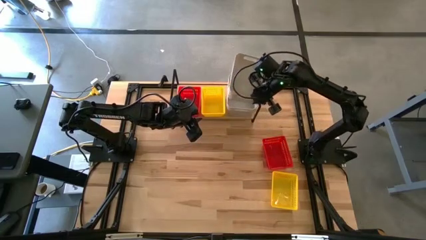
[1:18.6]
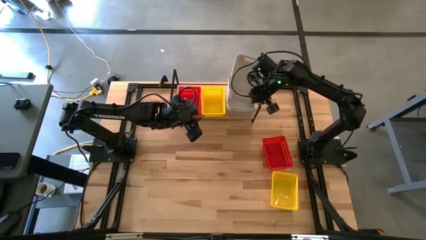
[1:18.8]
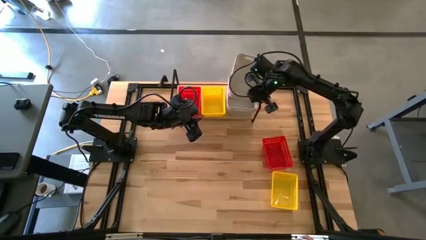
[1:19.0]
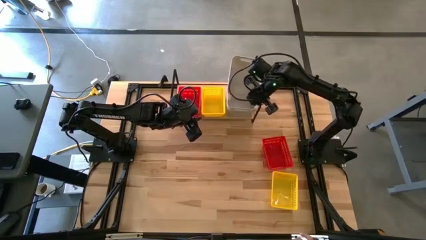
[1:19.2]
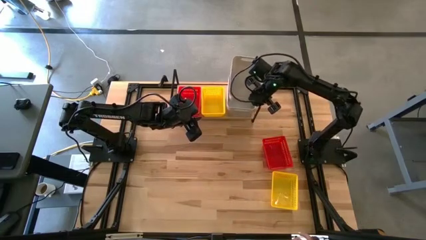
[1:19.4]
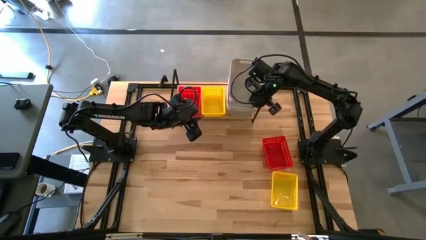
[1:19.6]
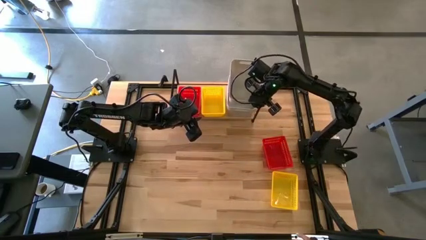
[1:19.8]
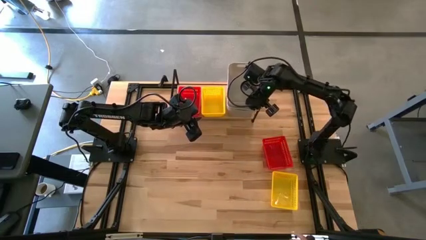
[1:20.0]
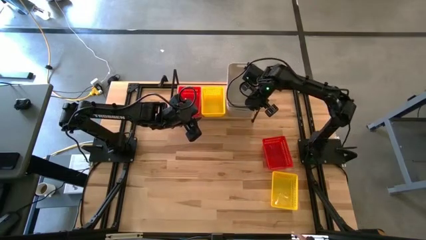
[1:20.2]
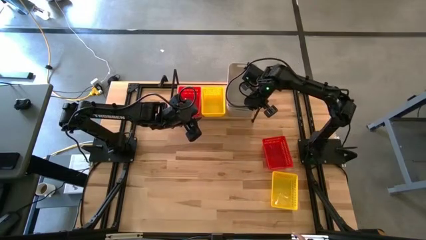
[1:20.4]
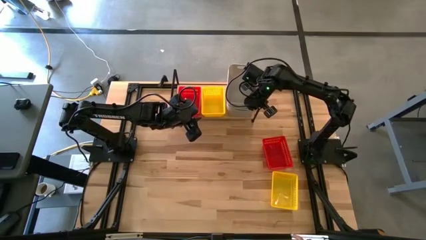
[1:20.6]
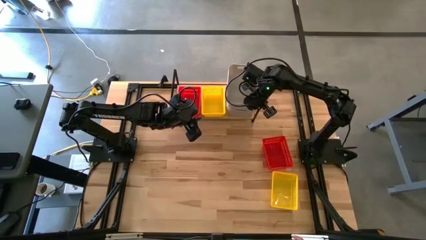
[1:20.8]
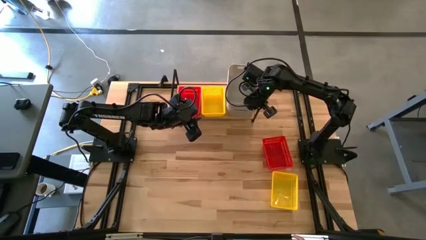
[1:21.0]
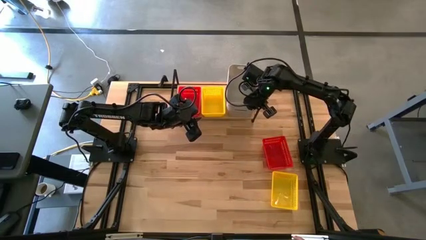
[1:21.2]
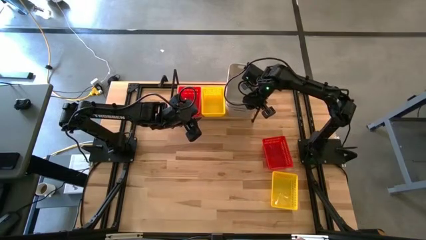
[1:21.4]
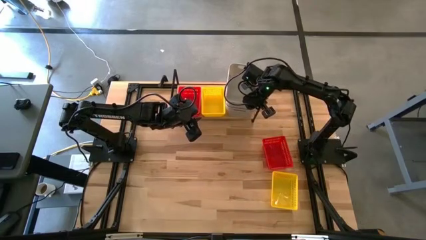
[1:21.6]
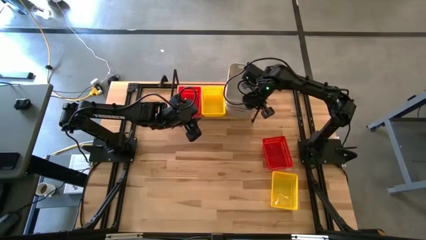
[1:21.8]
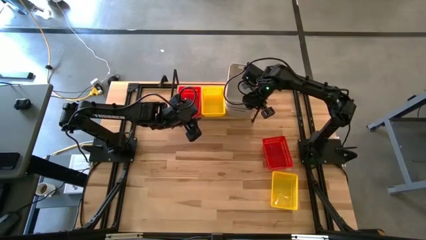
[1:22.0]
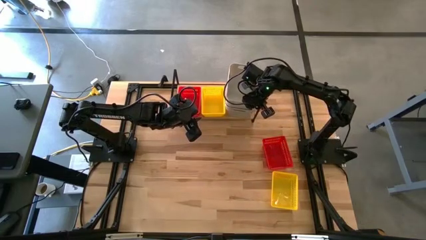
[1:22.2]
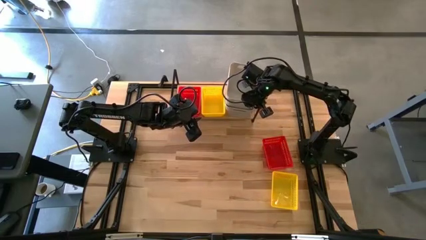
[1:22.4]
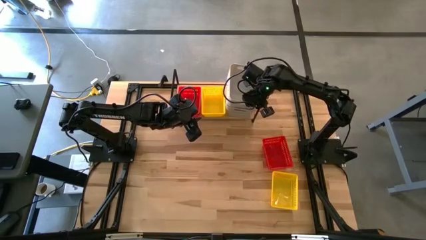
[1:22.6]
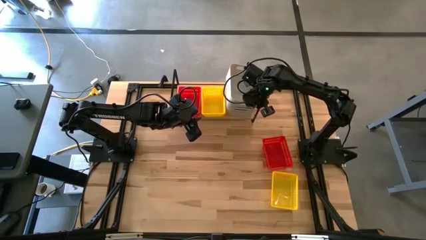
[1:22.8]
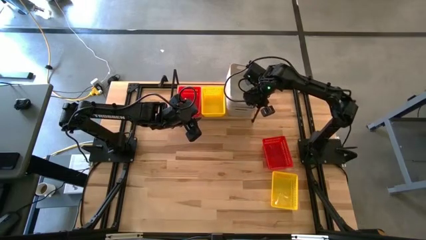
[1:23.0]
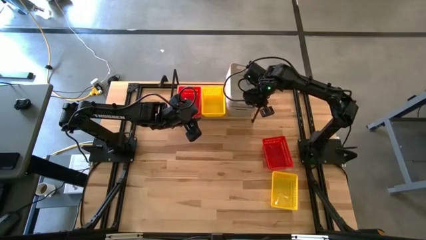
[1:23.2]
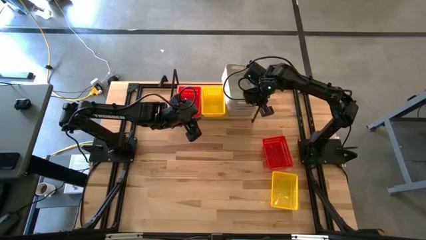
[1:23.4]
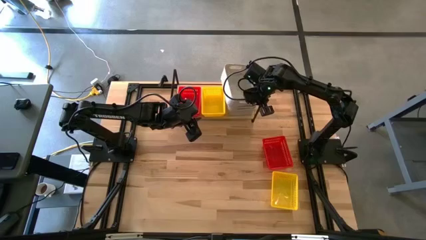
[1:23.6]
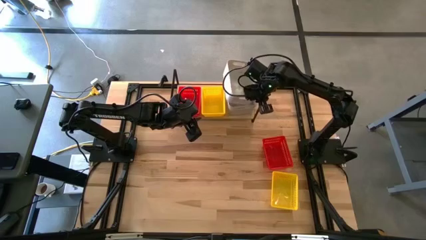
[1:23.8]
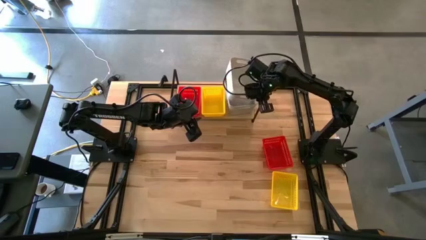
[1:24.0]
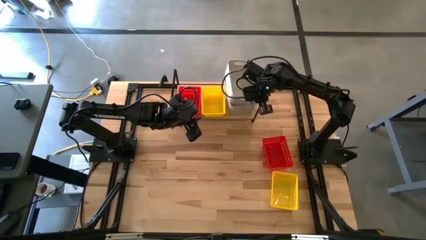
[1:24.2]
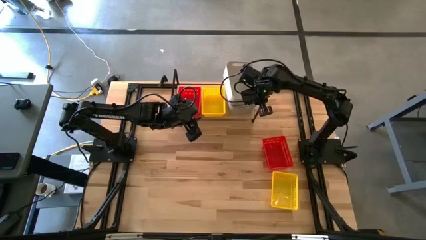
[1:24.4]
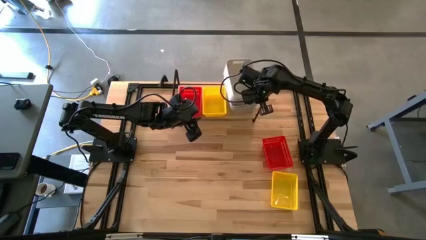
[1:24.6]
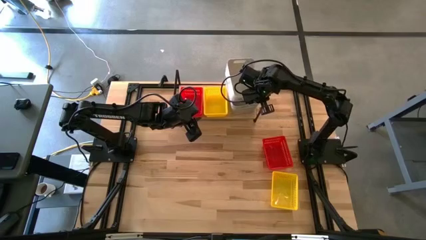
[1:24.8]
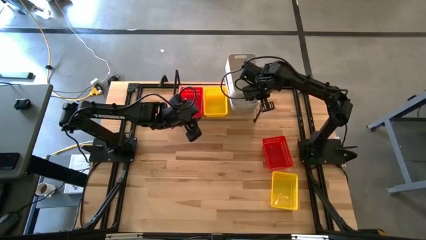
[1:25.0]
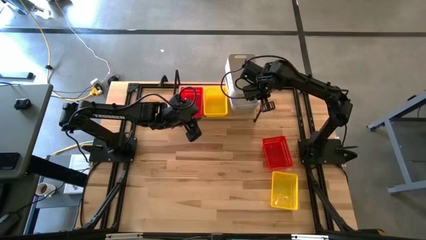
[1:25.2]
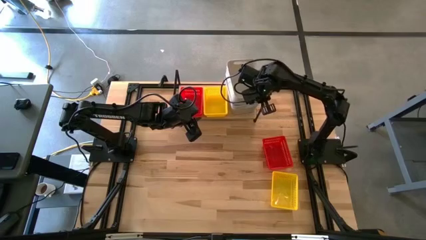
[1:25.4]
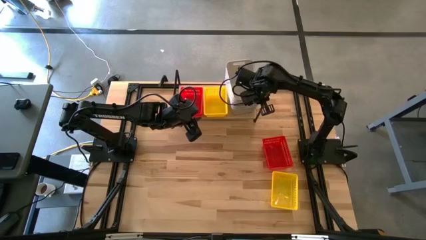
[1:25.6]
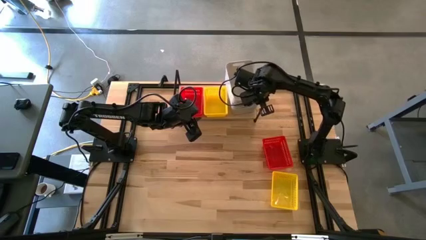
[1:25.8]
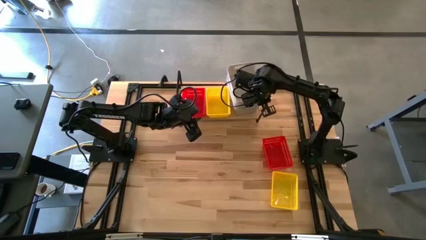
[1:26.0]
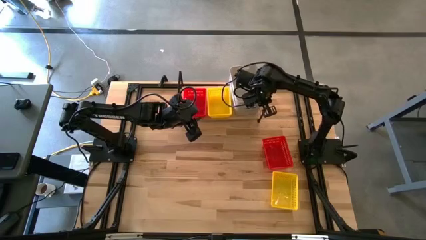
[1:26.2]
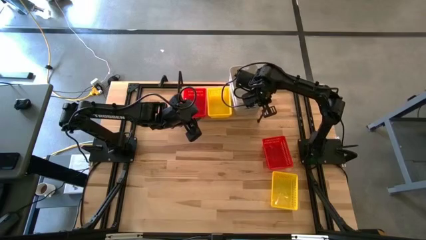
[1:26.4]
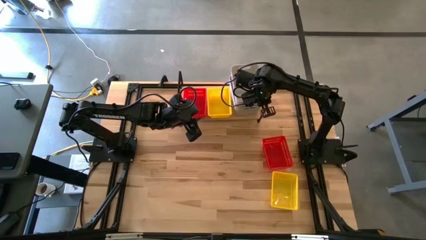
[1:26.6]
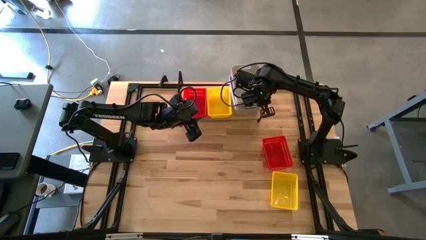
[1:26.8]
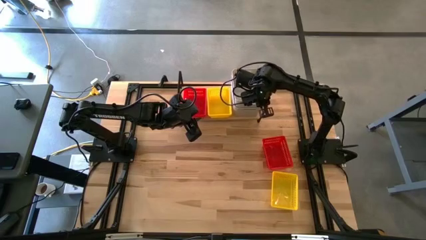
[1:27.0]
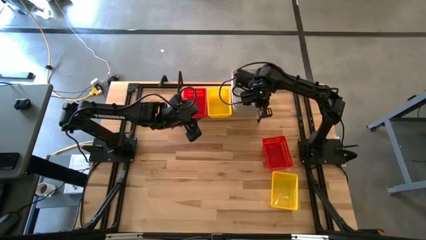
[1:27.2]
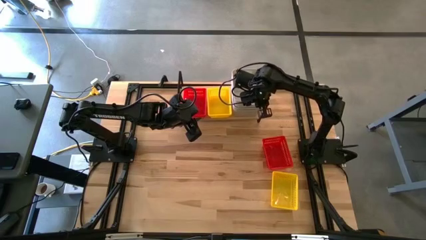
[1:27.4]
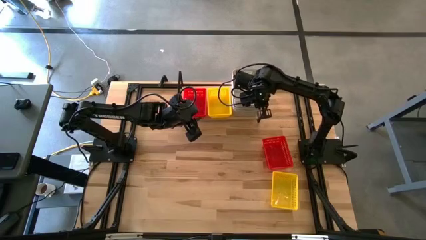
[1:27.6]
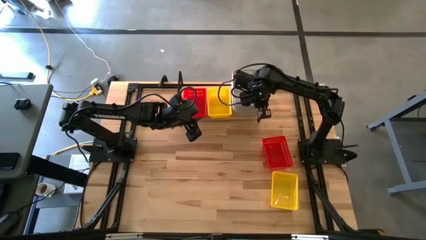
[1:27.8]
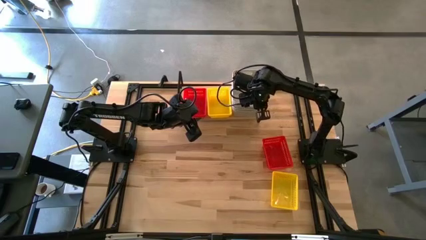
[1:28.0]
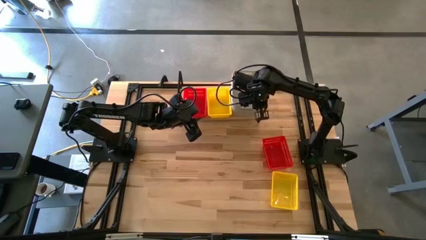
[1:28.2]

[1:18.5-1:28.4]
Task: Stack baskets on shelf by color
Stack the gray bin on the gray bins on the shelf

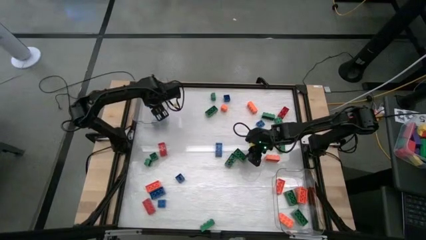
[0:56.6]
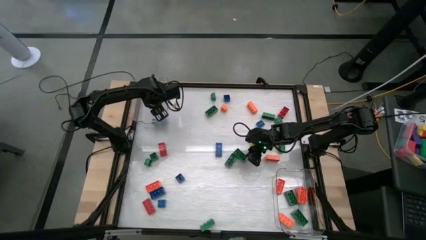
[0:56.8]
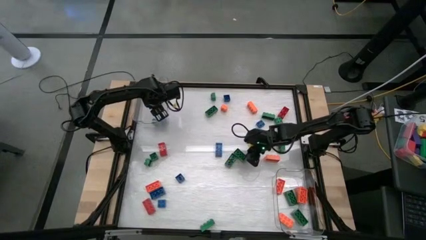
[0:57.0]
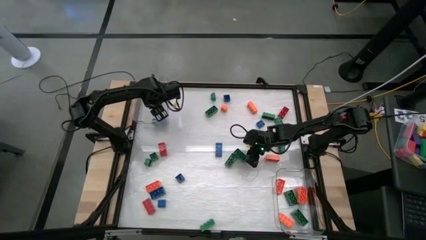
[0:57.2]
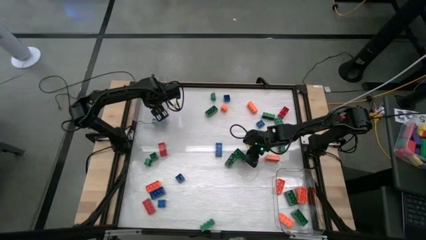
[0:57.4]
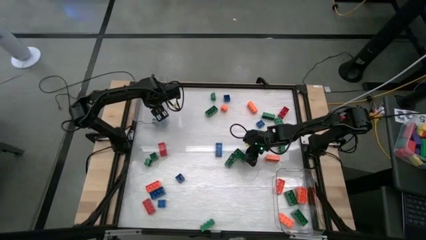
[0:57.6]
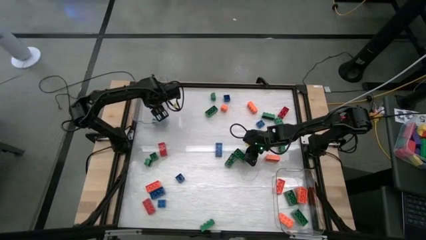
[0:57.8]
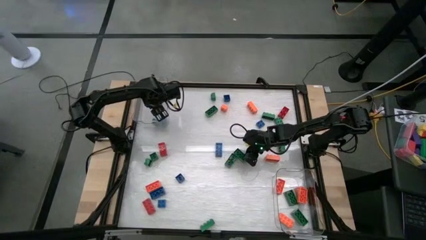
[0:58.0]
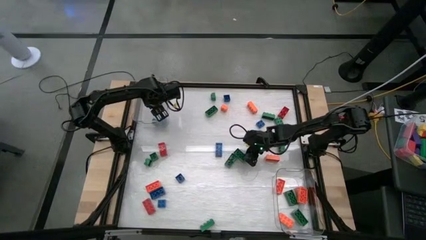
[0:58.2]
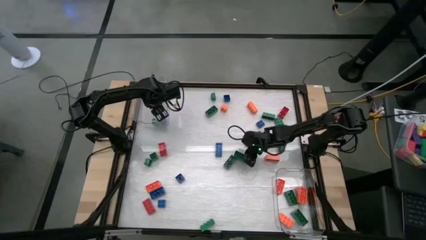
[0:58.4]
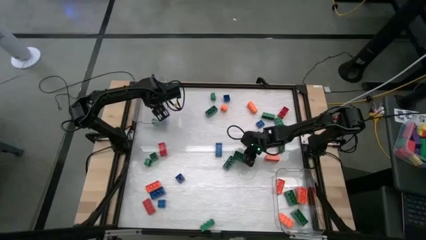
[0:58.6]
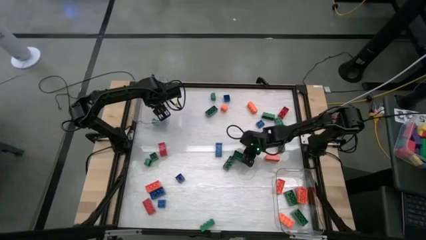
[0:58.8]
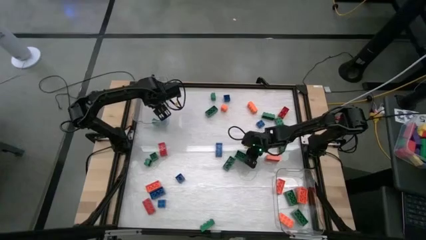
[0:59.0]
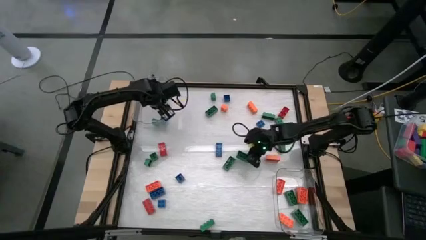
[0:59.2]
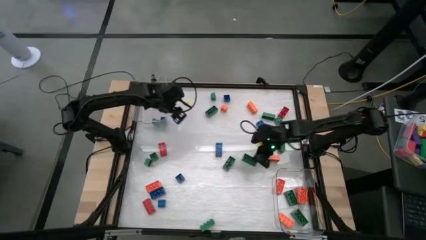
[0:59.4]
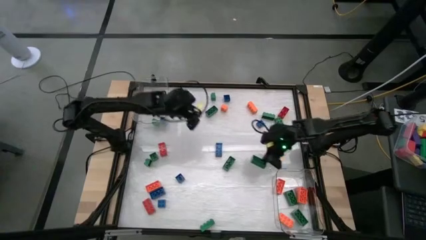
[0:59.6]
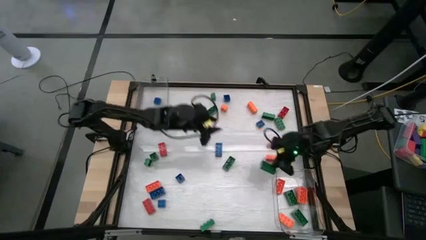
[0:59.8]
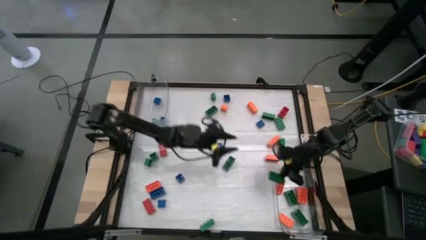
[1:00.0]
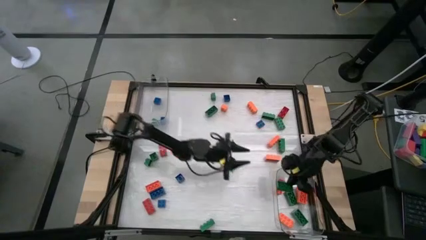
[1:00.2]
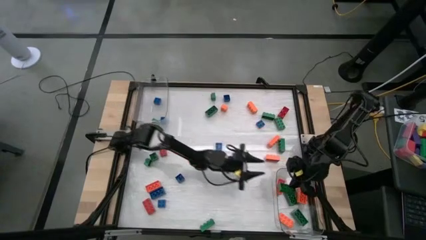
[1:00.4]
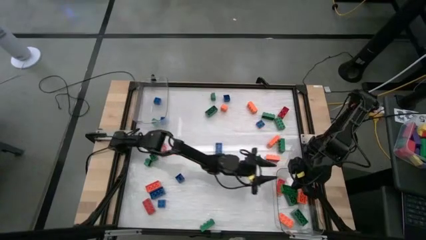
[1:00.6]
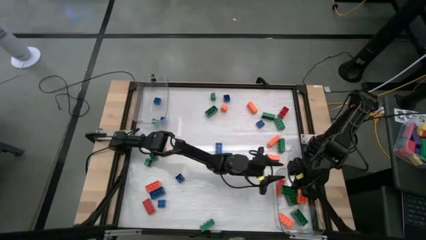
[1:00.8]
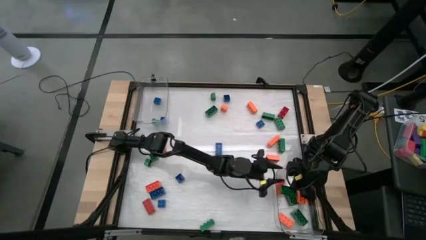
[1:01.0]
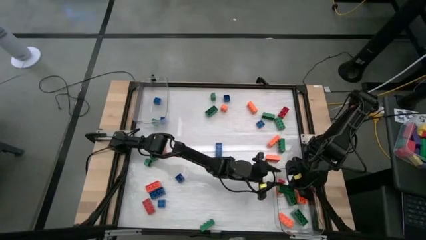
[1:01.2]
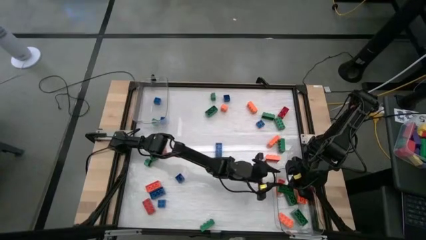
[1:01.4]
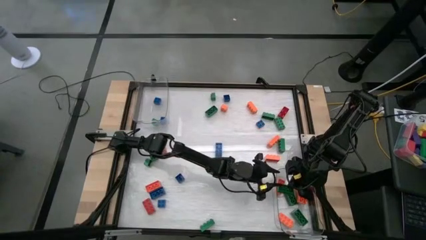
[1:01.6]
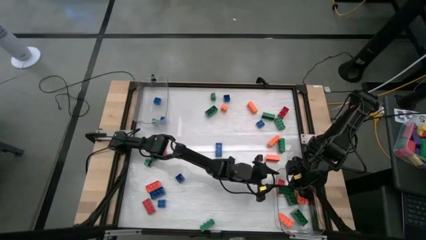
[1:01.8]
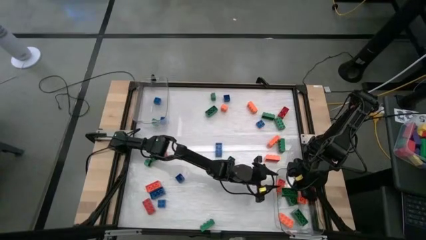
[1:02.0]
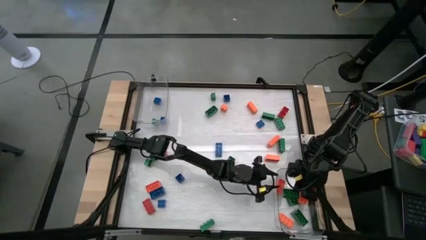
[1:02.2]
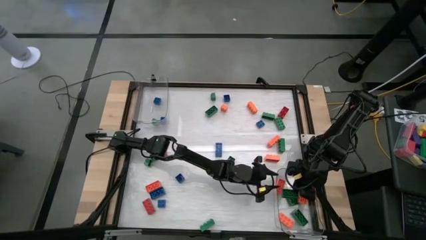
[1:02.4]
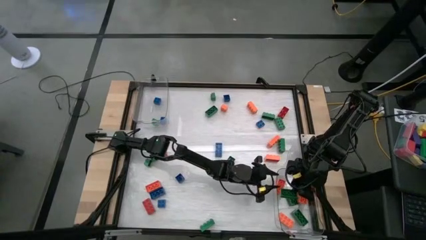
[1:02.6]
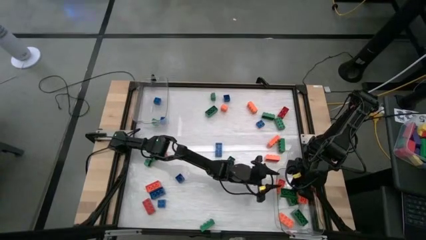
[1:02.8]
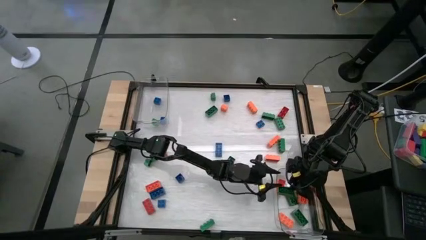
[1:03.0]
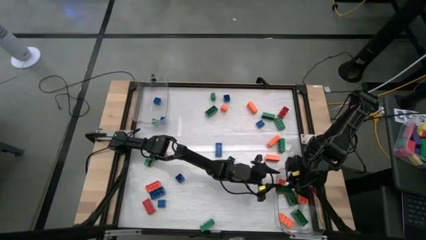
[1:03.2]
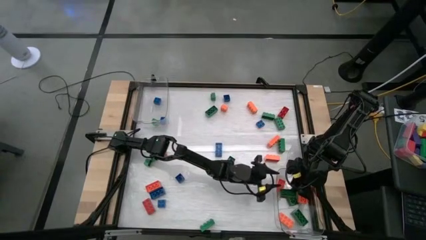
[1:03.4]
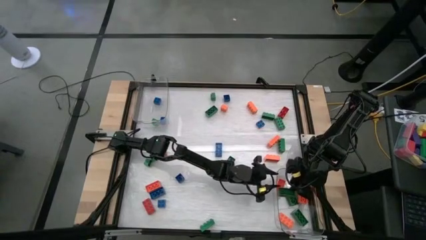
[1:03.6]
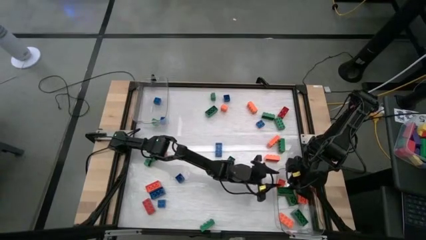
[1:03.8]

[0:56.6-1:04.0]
Task: Sort blocks by size
Put the 8 stud green game piece into the bottom transparent bin
